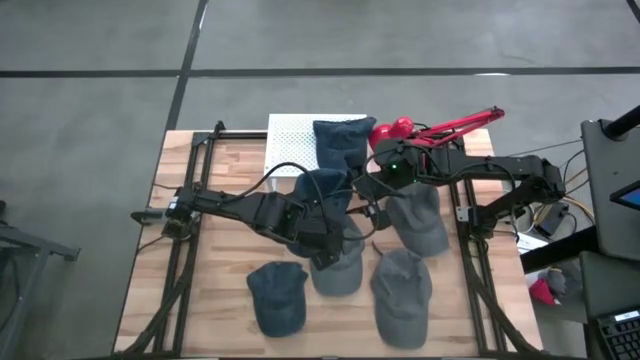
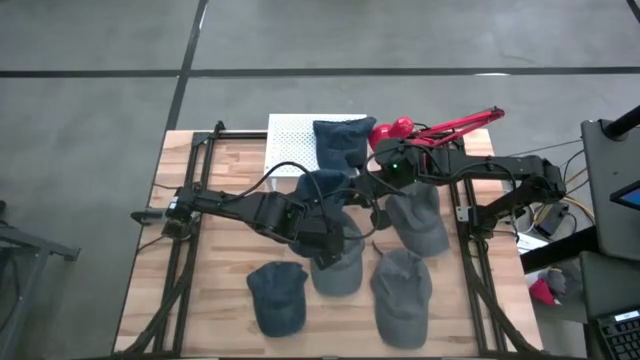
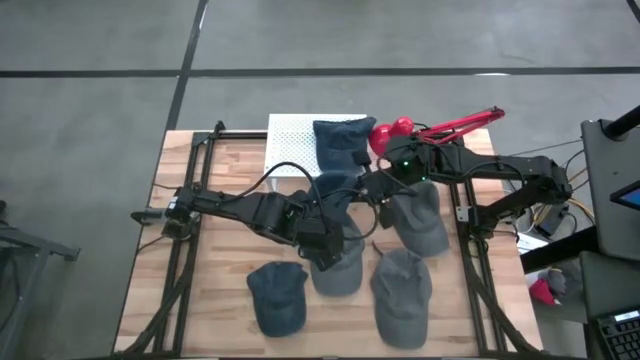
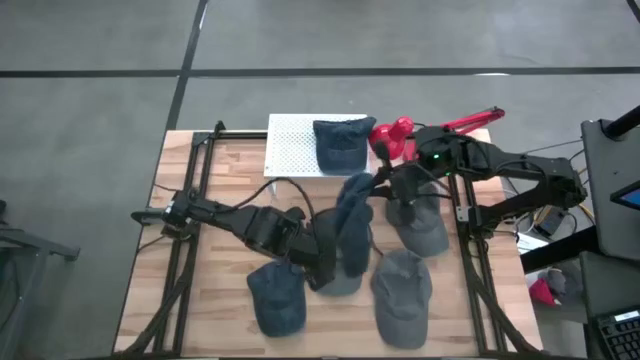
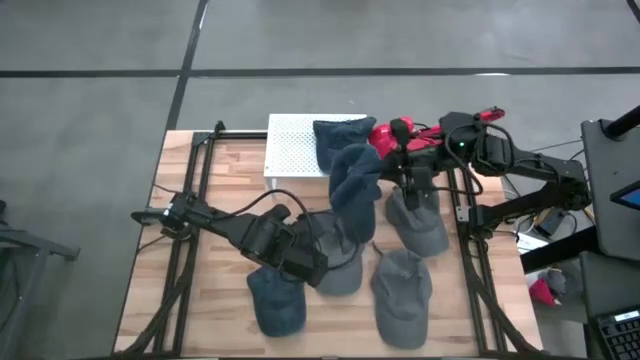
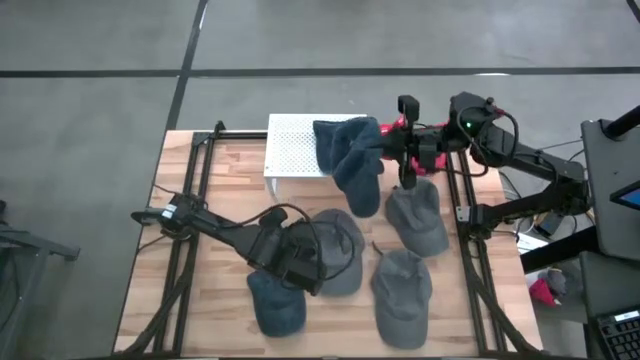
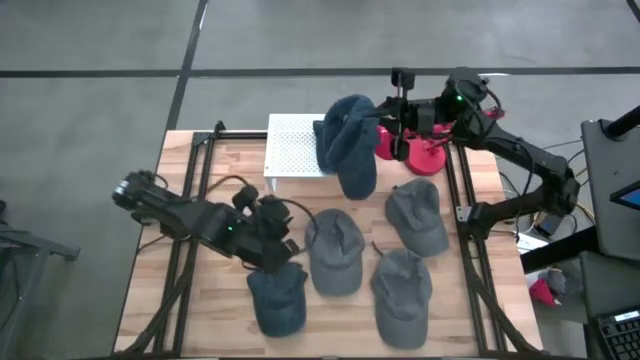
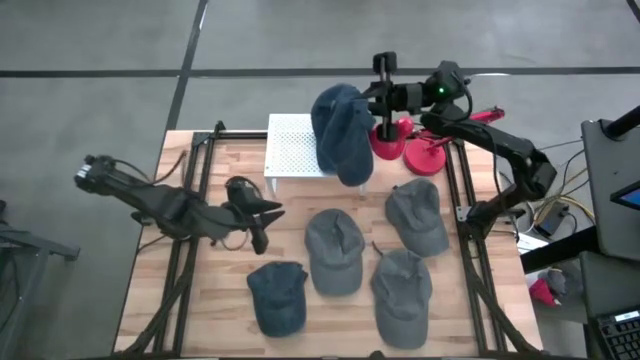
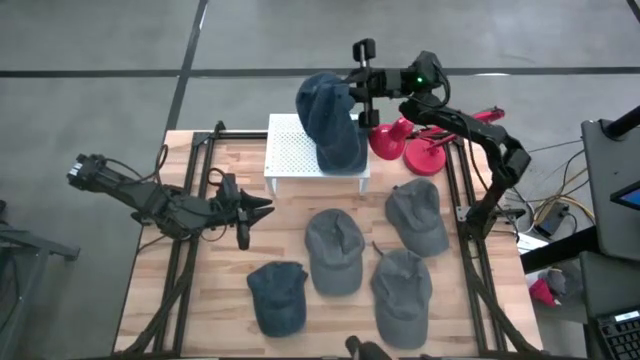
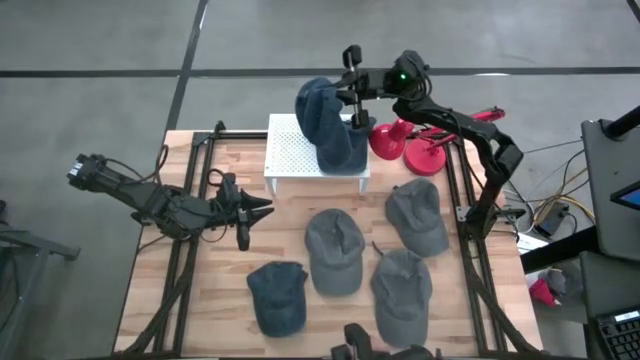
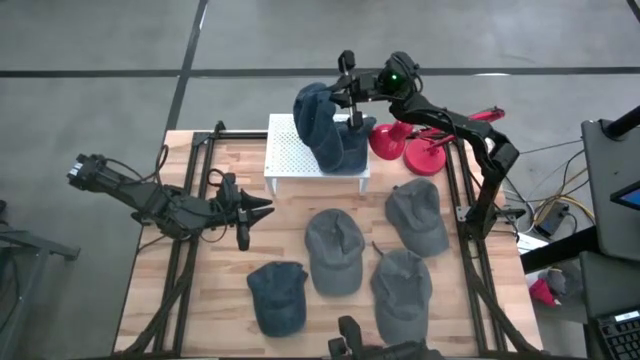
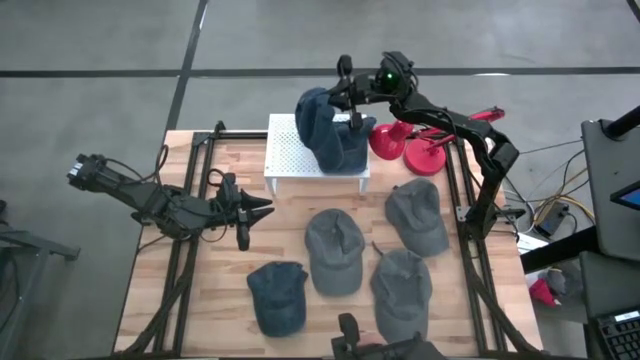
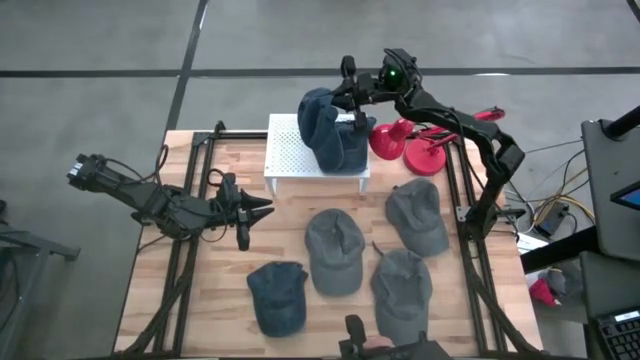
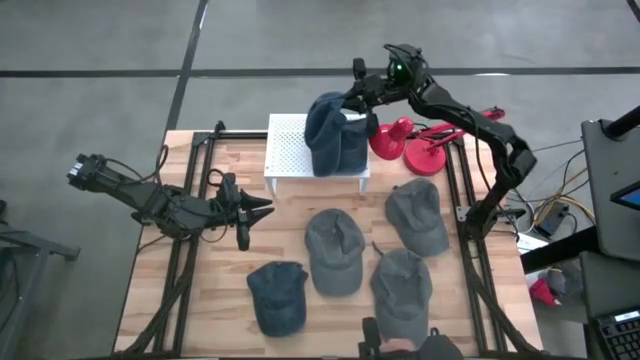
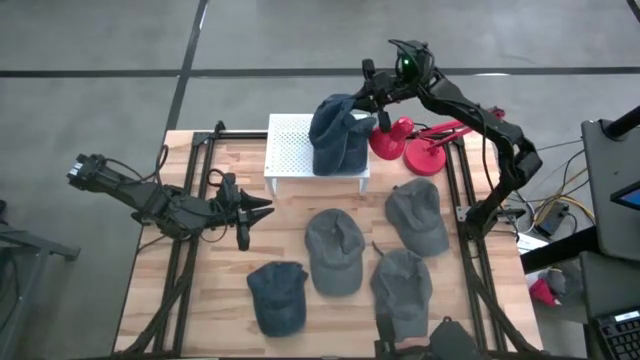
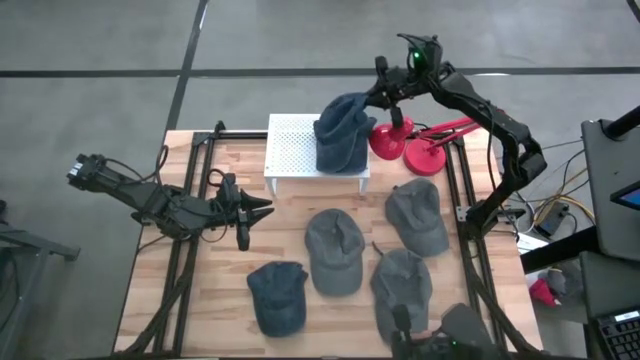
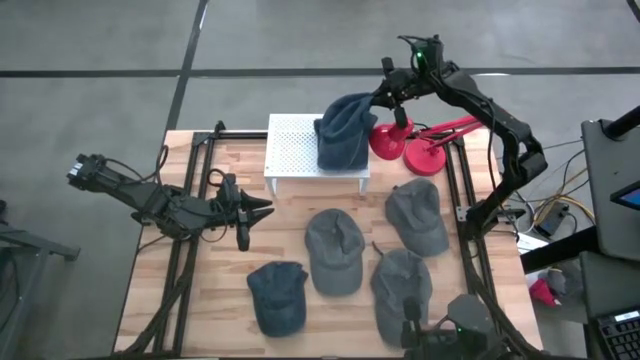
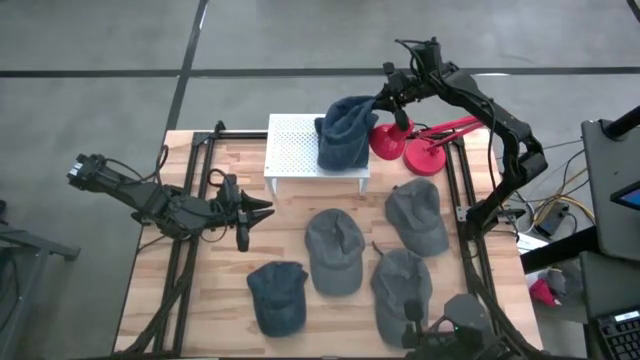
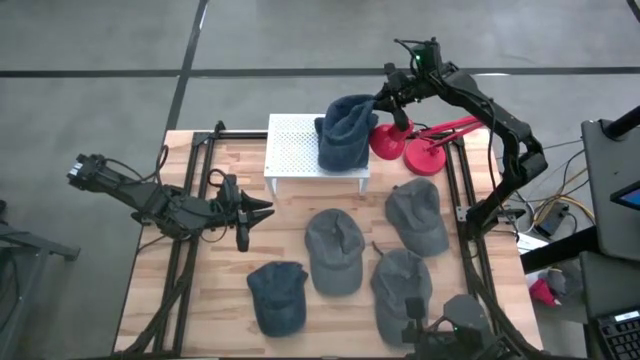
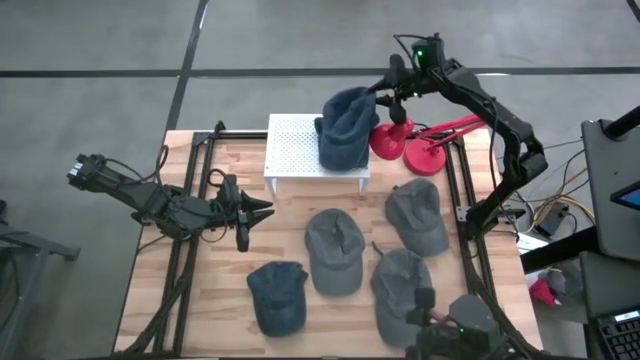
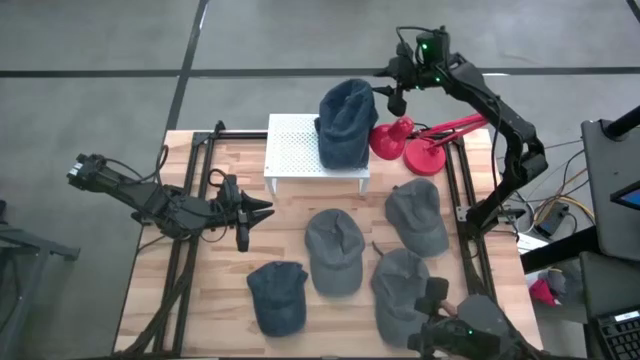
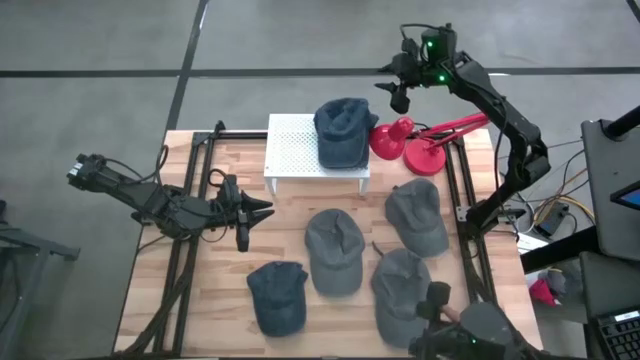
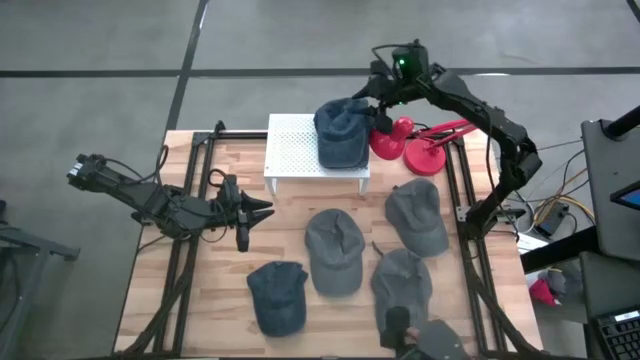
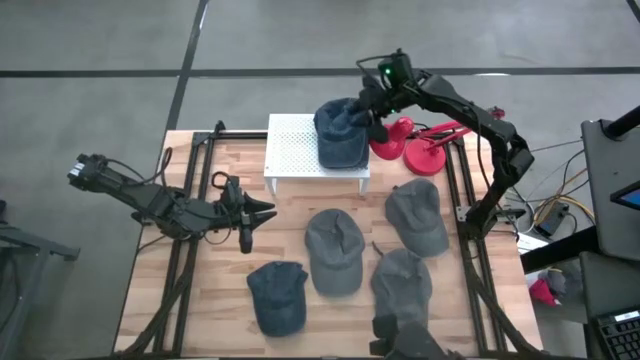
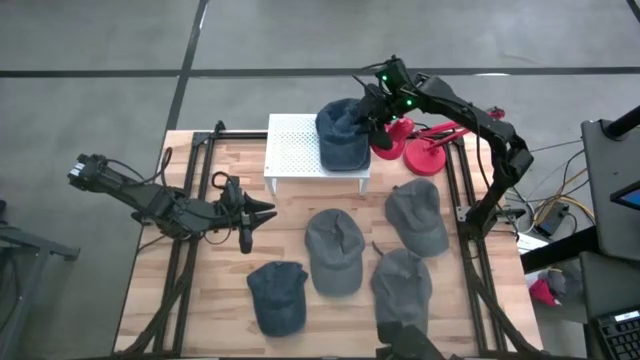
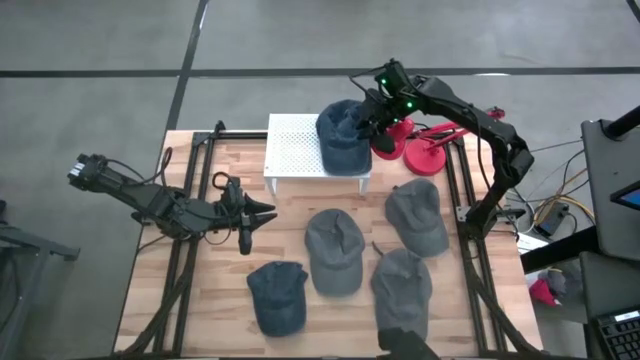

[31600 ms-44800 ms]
Task: Pick & Place hat
Stack the left blue cap on top of the blue cap on the shelf

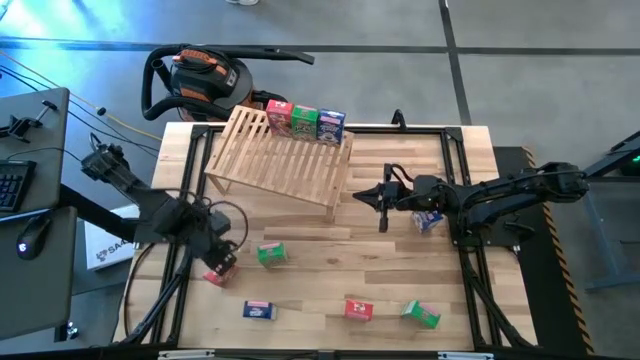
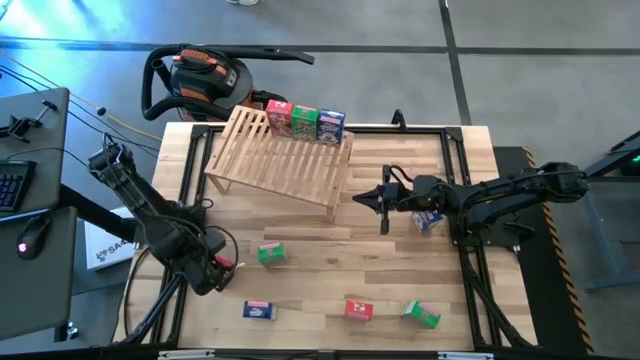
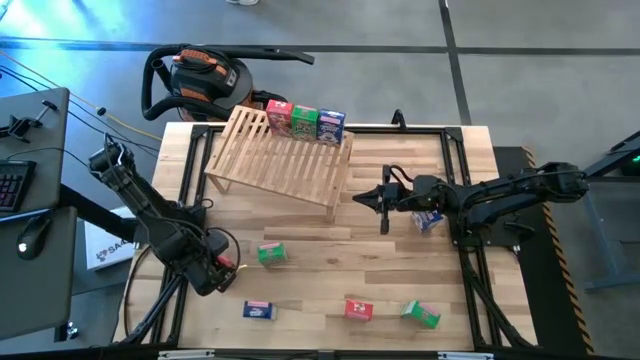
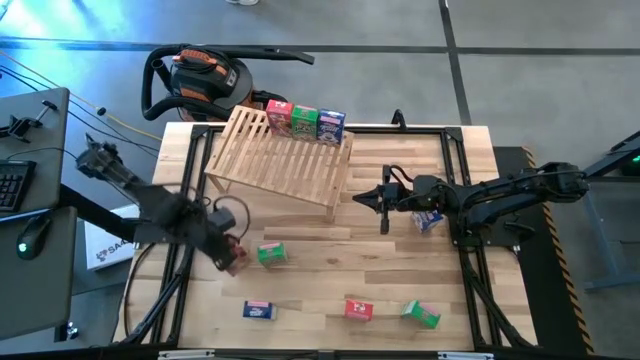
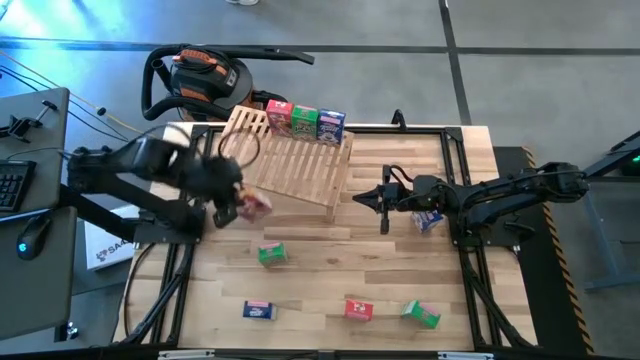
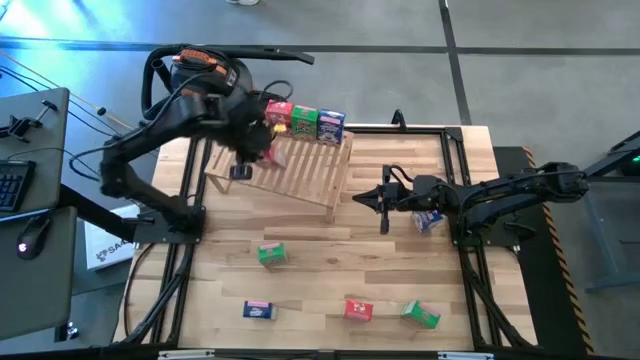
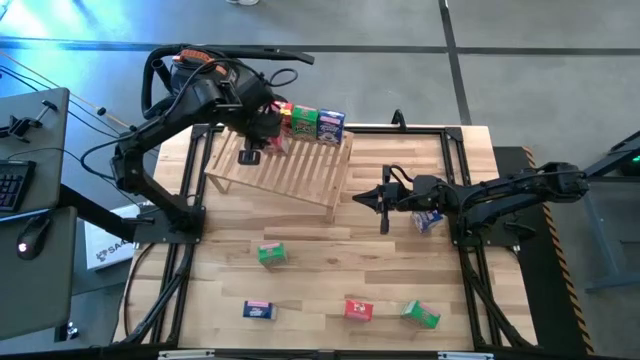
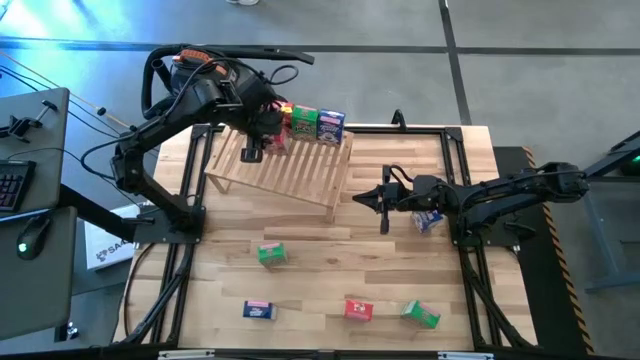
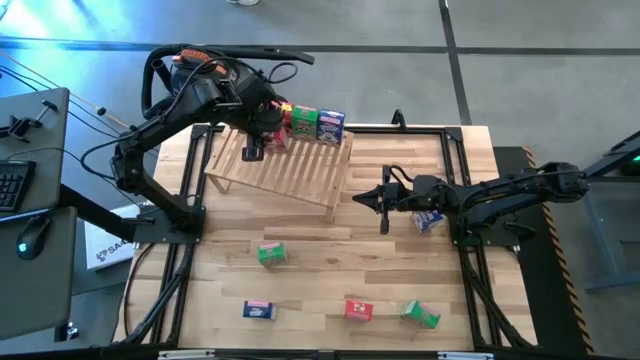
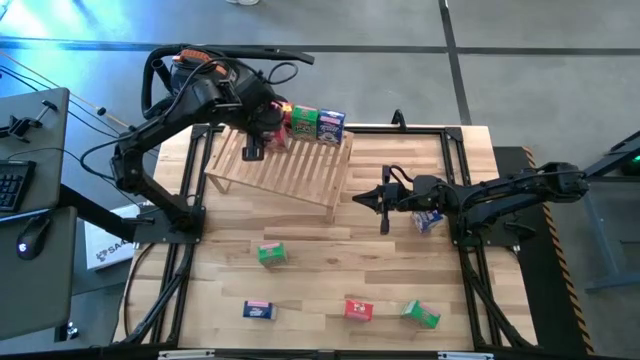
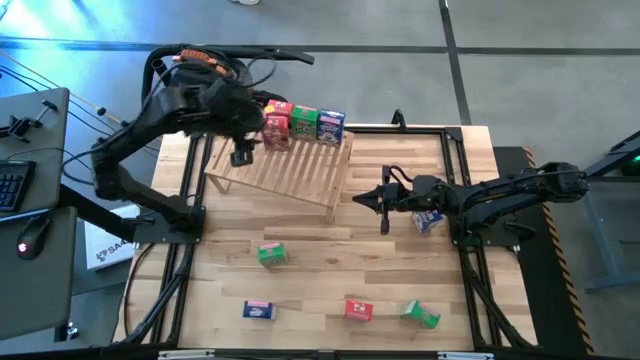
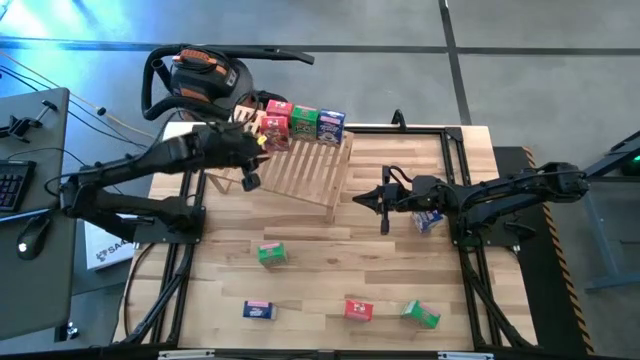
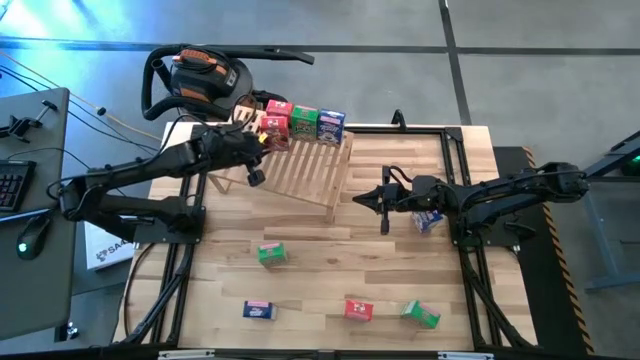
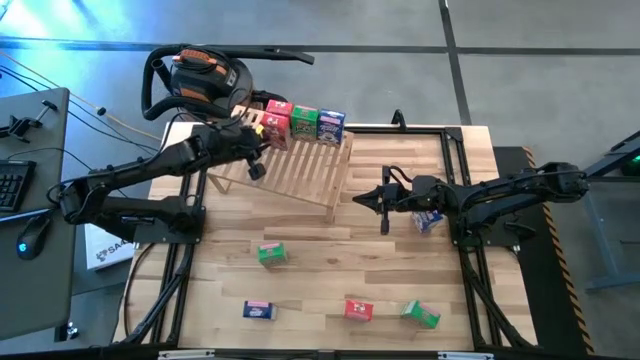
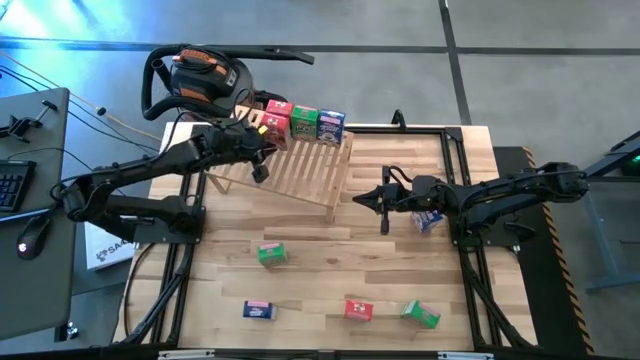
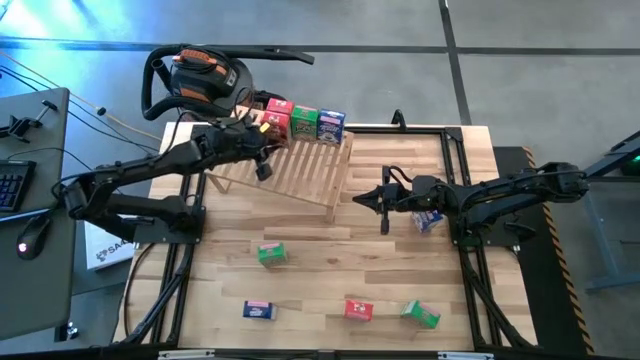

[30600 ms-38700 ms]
Task: Stack cereal on shelf
Put the left red cereal box on the shelf aligned with the other red cereal box

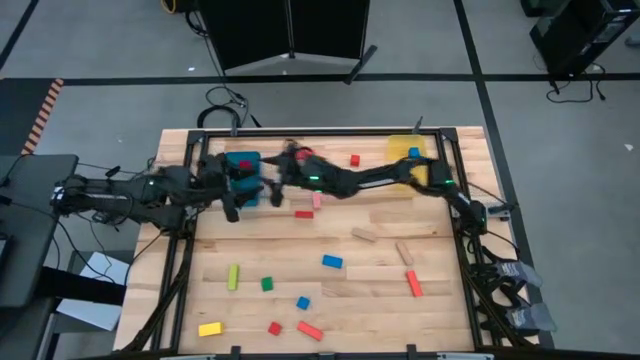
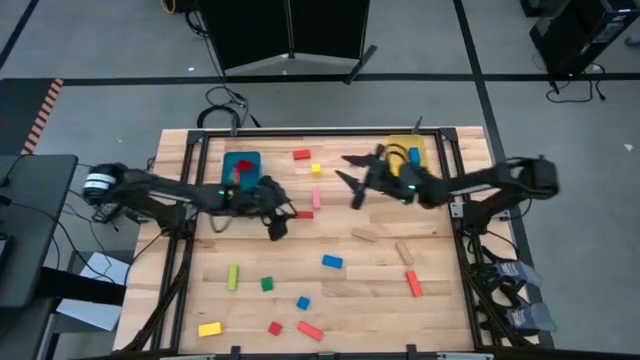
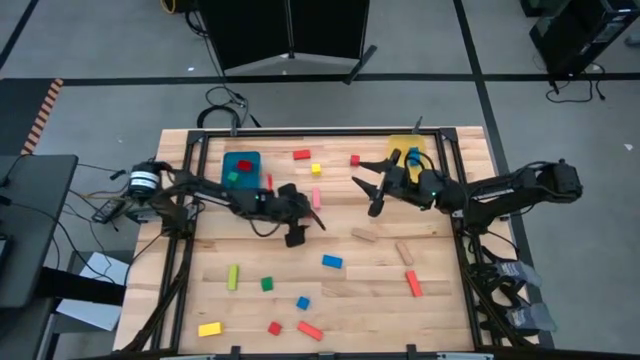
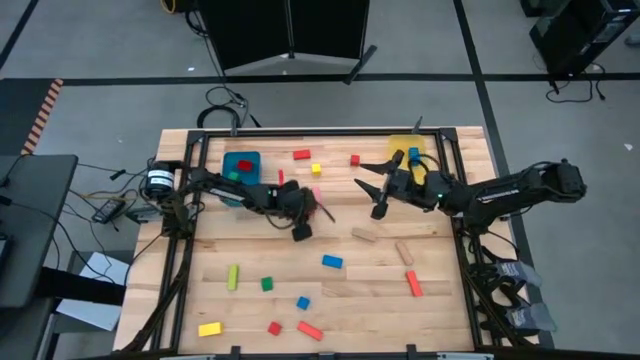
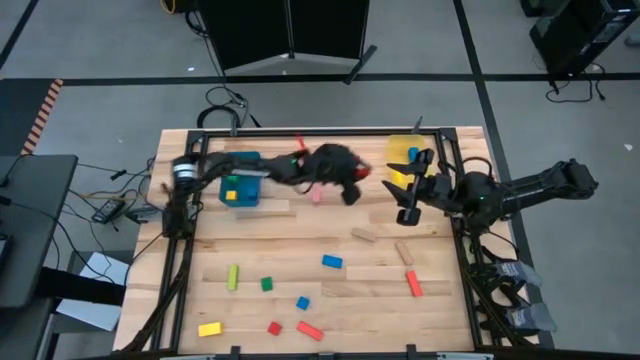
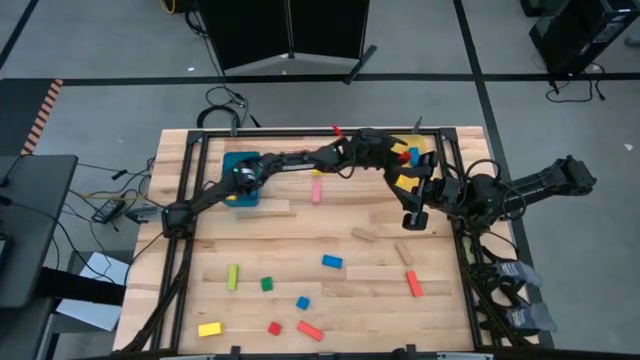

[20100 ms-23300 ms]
Task: Sort blocks by size
Put the large red block into the yellow bin
